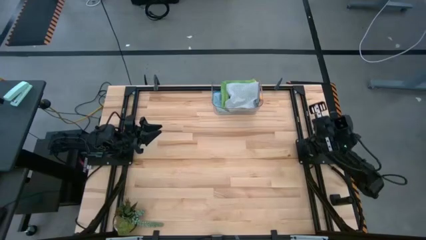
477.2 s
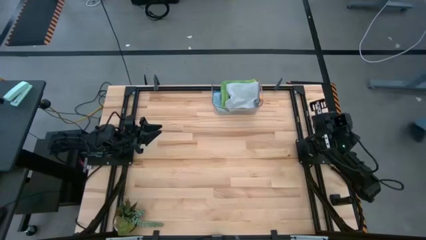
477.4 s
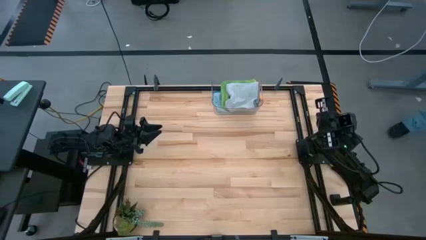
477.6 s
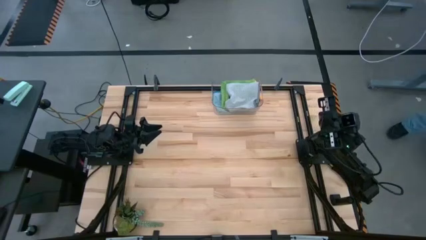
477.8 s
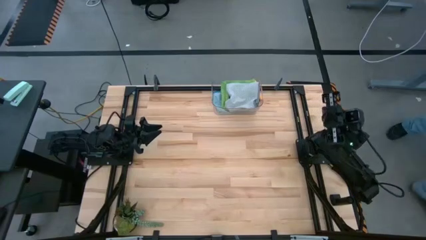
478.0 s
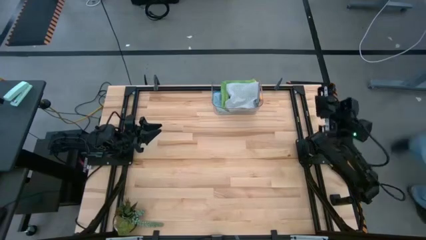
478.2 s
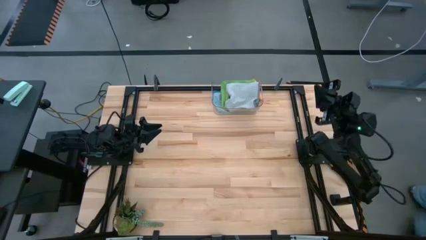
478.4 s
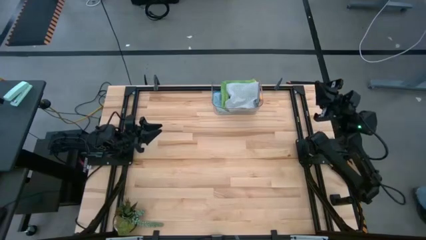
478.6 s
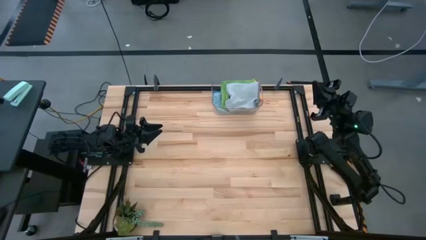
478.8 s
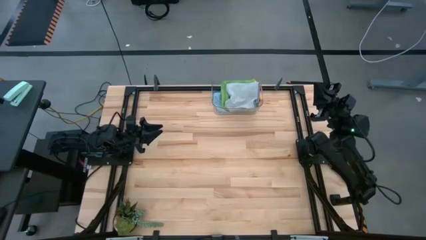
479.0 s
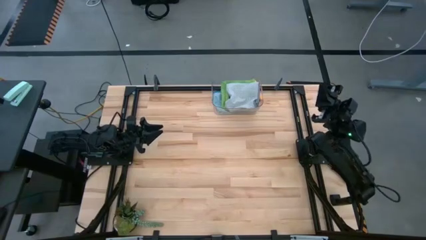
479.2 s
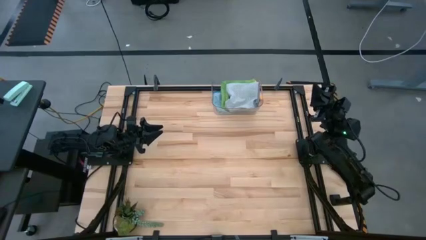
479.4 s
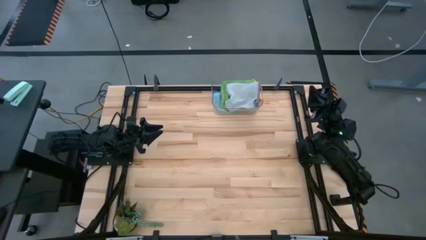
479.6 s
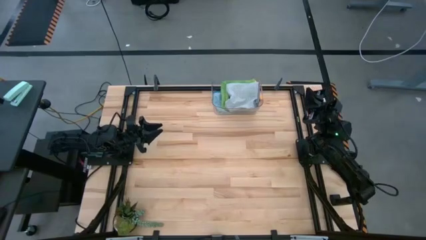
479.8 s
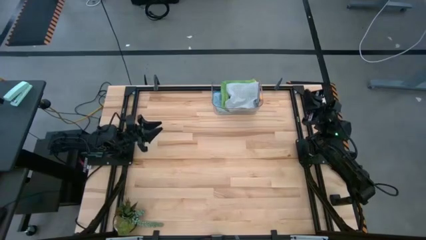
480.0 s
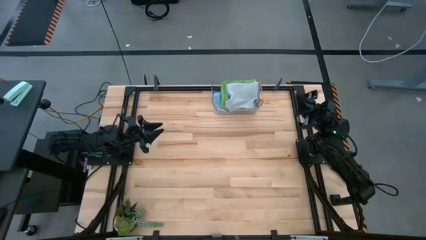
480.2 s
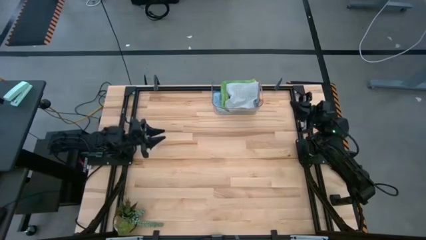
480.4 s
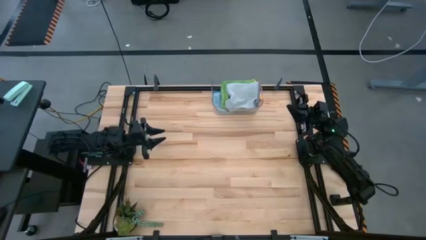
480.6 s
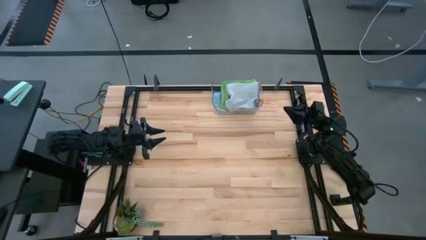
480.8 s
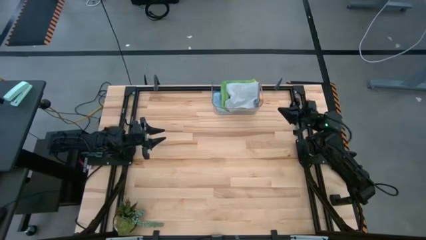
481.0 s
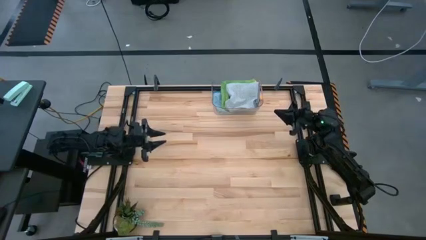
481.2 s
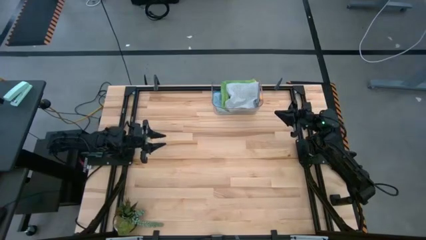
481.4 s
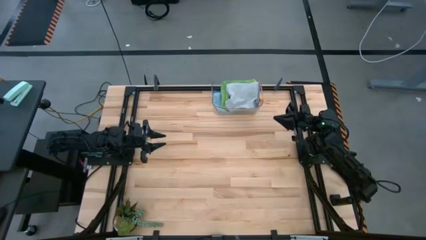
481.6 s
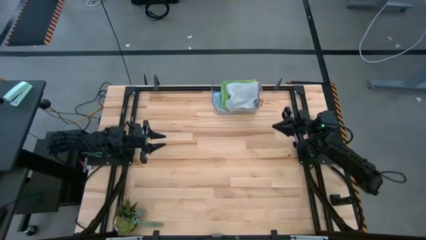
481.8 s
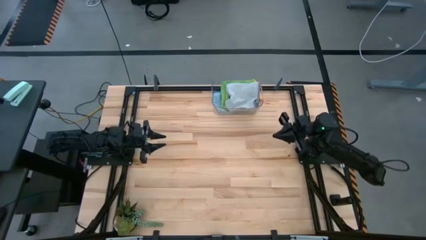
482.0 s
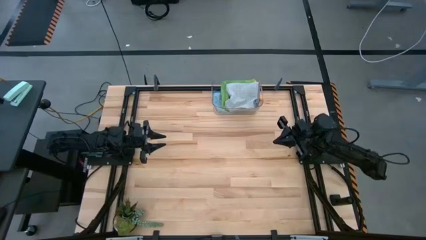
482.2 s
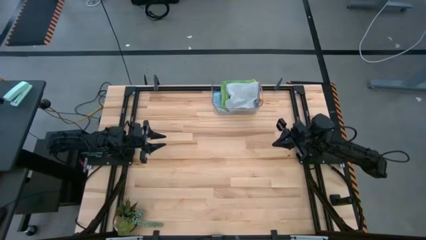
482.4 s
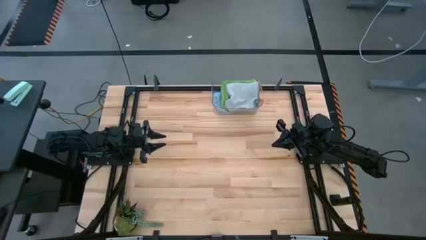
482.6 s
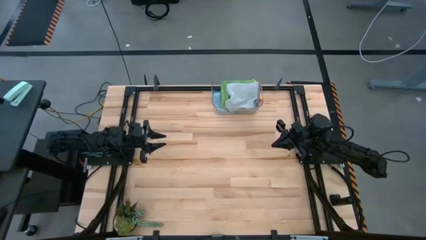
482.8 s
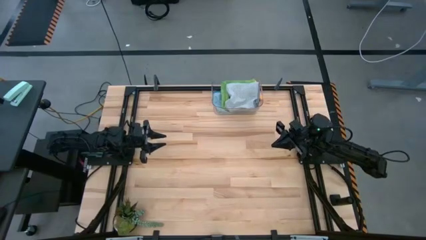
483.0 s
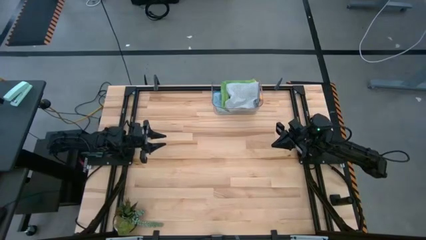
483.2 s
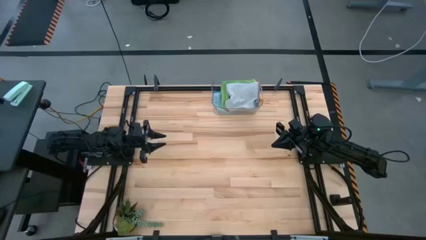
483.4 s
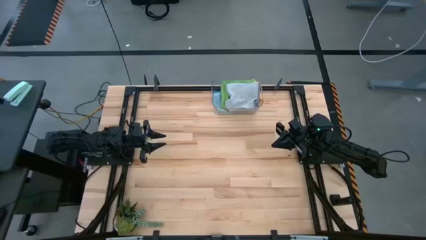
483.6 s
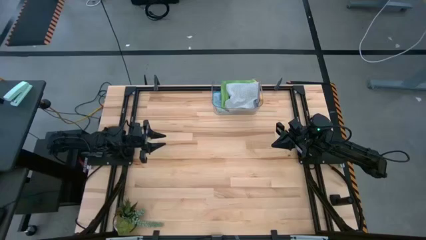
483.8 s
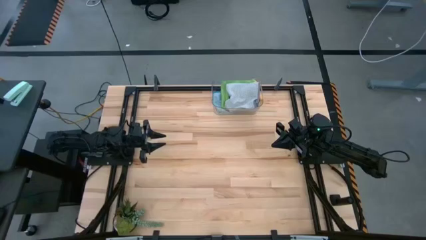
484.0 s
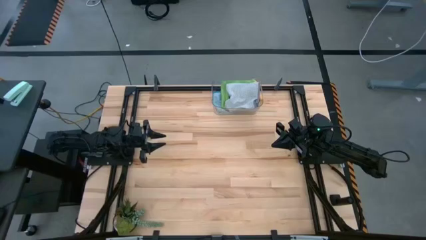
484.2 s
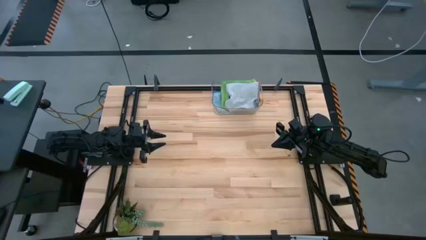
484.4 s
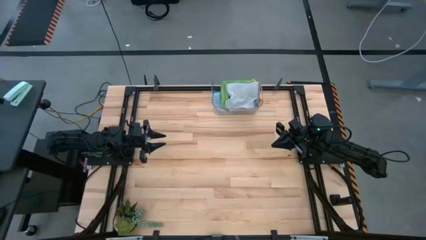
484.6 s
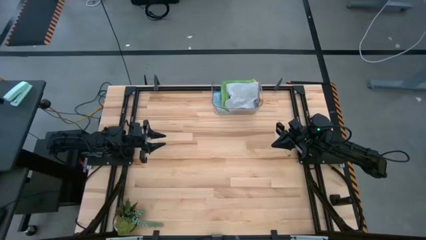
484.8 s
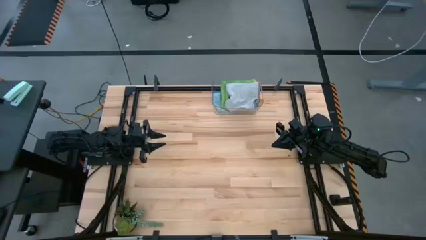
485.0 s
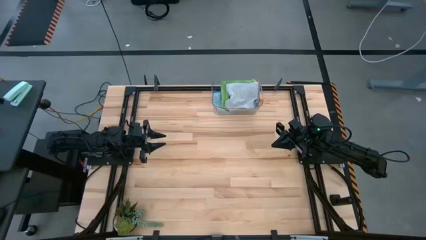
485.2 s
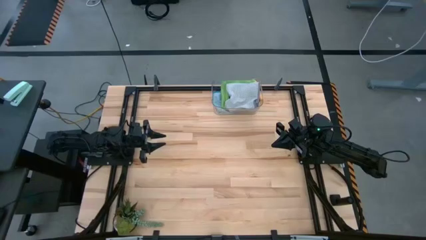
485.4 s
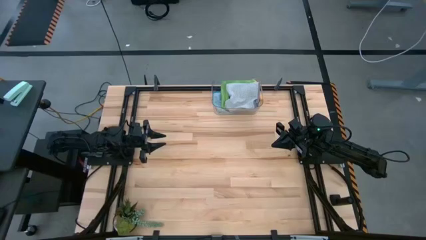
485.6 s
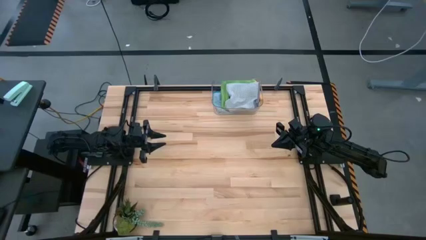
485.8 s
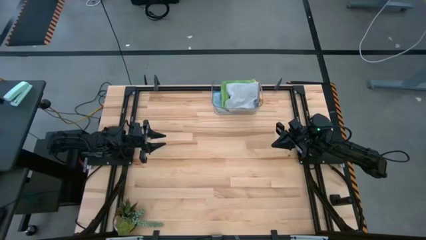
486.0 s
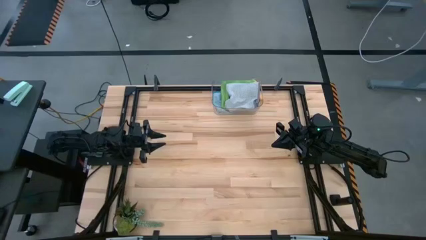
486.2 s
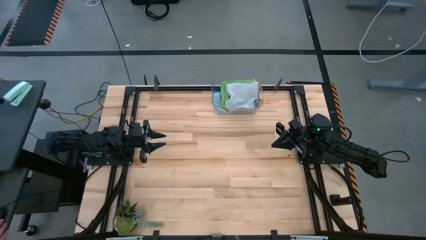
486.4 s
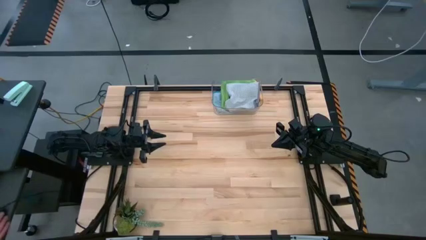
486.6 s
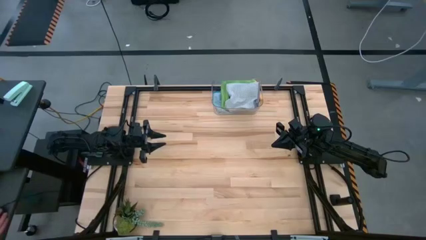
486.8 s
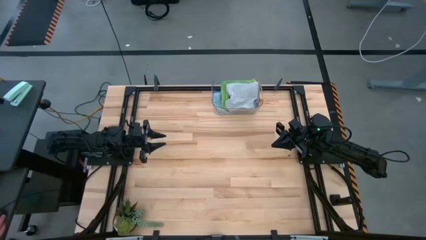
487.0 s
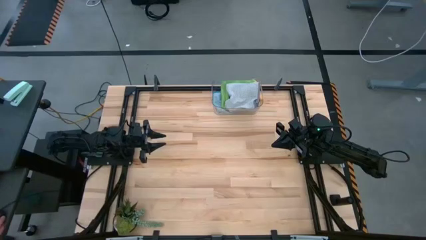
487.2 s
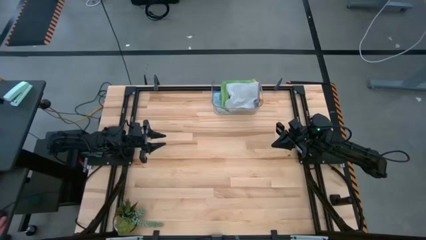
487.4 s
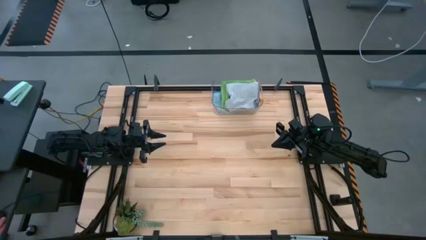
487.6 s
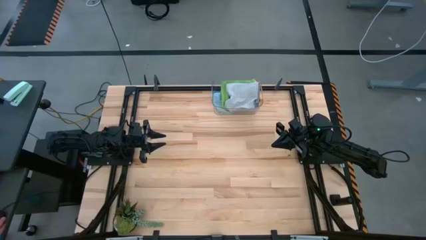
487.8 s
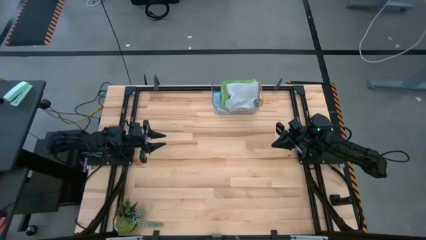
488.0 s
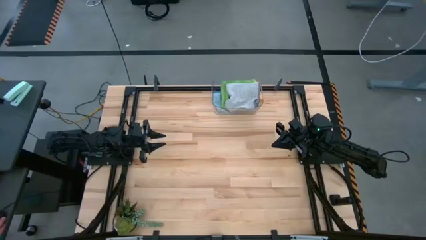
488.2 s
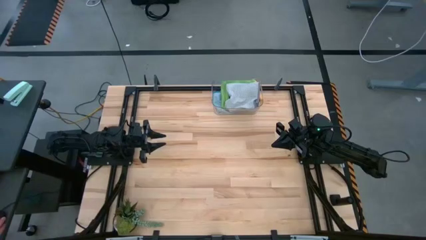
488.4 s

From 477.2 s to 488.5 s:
Task: Fold microfiber towels
Return to Home Position

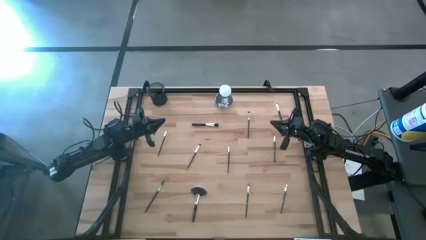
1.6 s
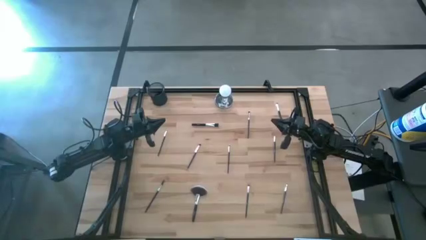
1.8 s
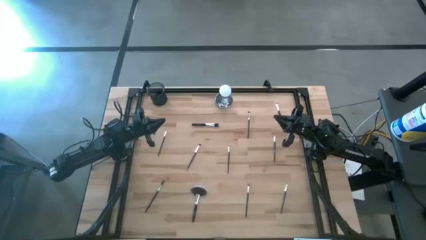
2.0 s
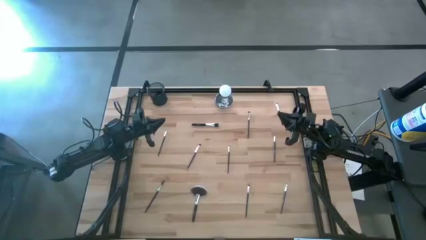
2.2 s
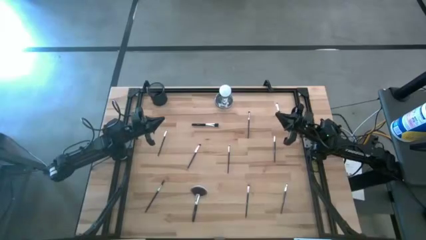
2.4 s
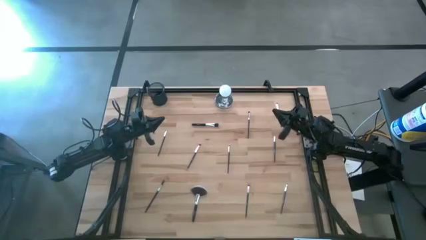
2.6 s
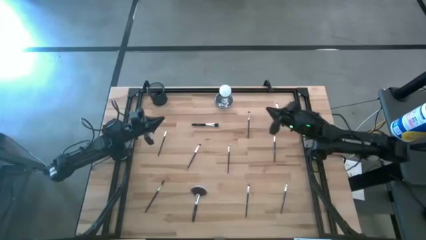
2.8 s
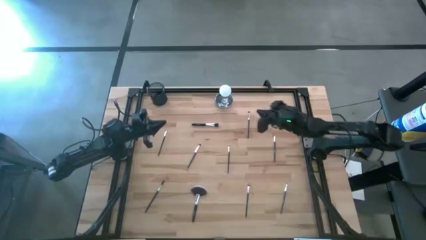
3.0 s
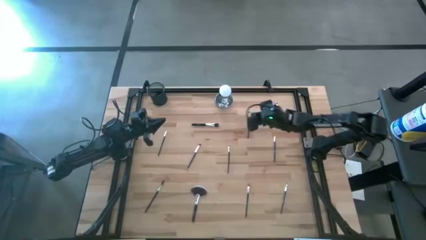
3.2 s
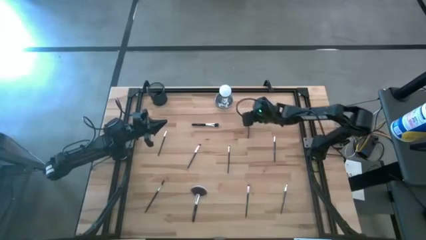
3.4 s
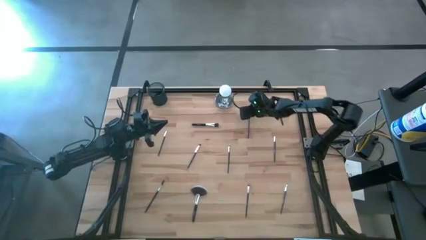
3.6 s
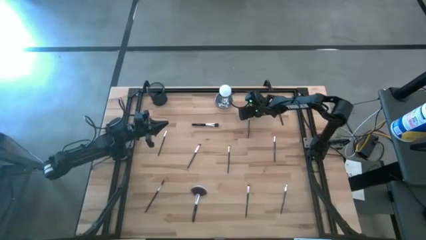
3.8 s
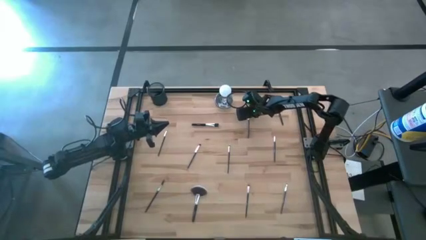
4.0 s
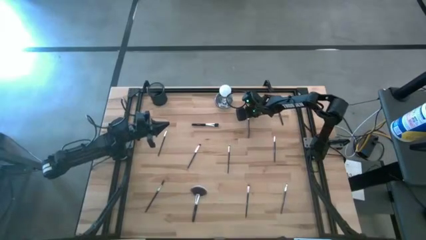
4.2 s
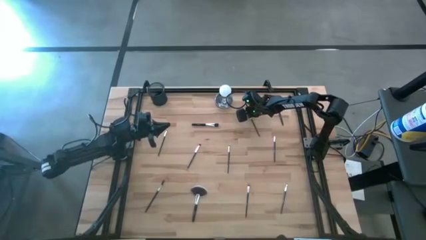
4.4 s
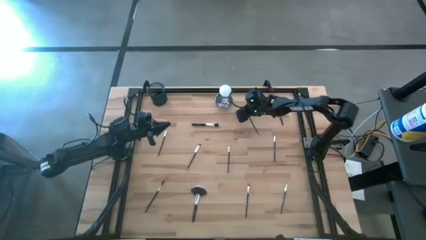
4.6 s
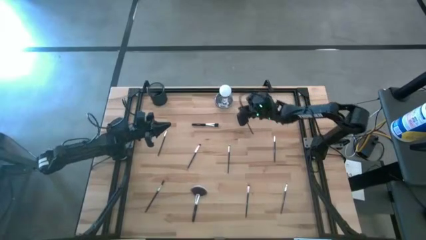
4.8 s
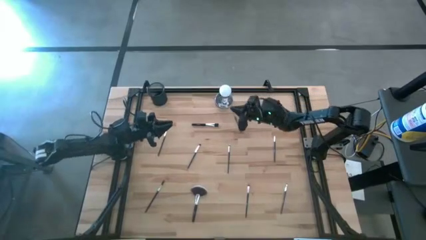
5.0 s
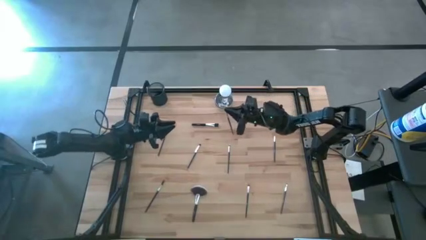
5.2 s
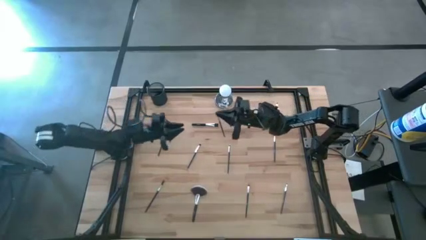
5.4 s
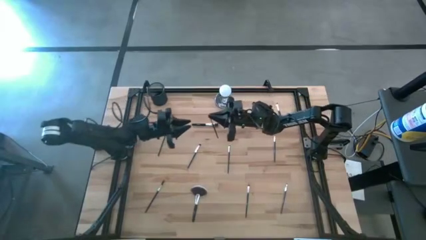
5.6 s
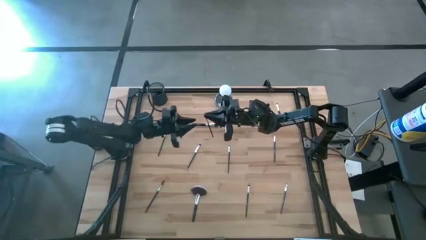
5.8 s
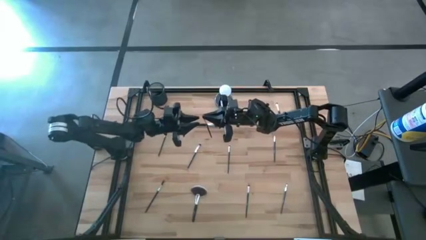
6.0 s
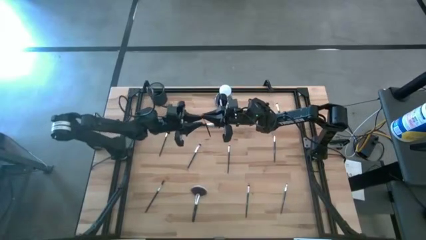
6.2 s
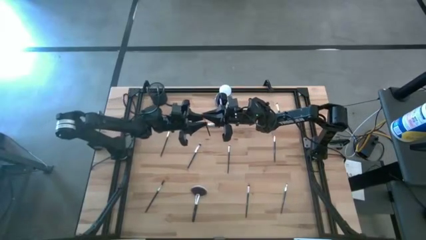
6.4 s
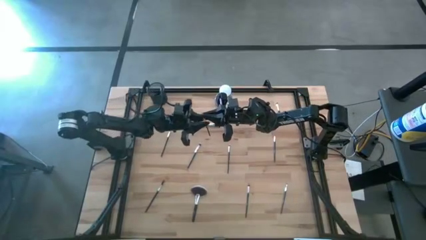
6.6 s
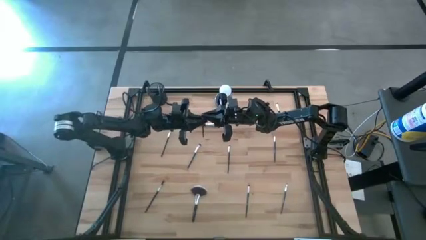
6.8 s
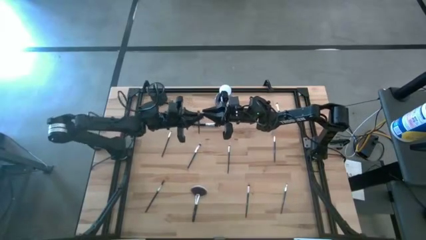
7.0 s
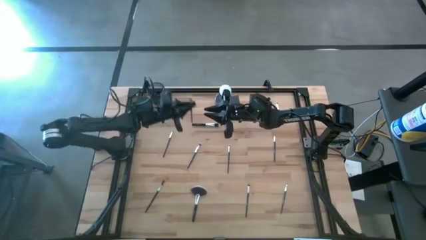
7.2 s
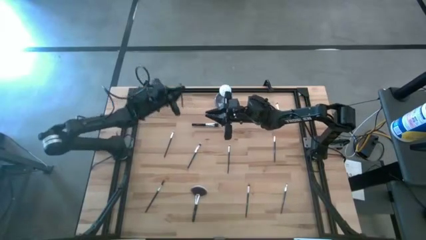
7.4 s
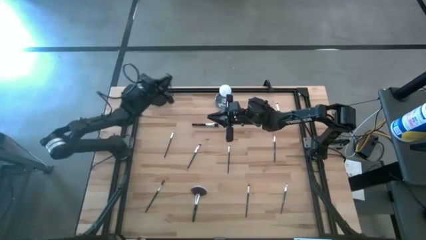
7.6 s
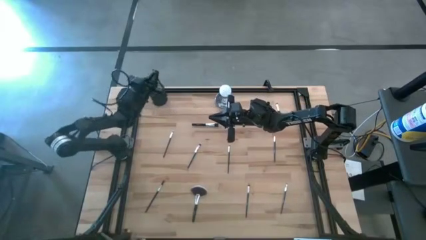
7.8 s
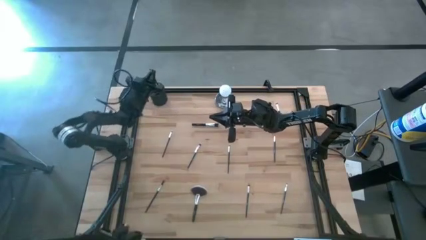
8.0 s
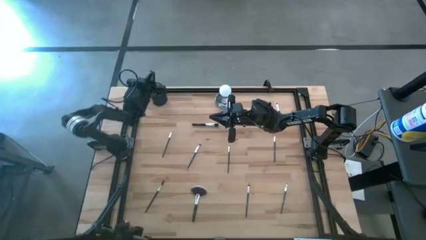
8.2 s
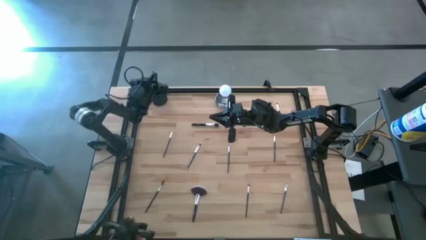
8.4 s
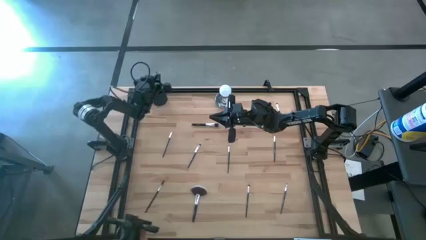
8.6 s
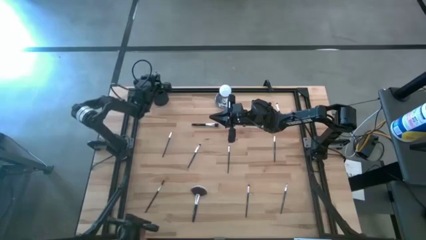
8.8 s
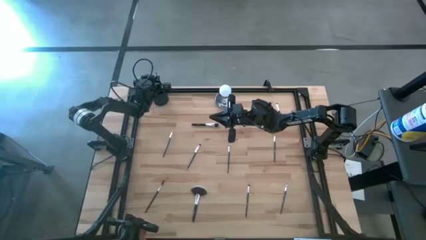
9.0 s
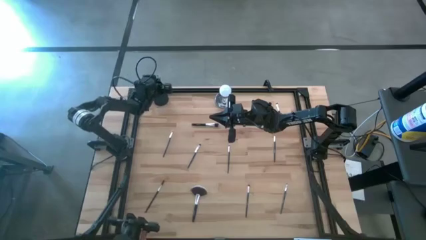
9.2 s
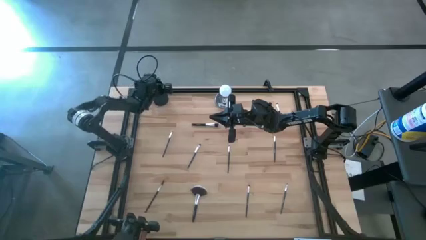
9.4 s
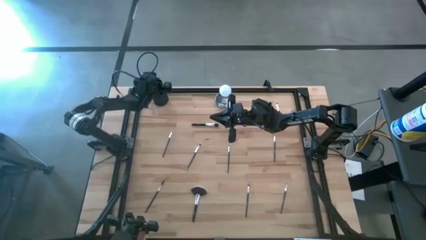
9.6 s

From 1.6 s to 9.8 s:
Task: Put items in baskets/containers
Put the black eyeshadow brush into the black brush holder
